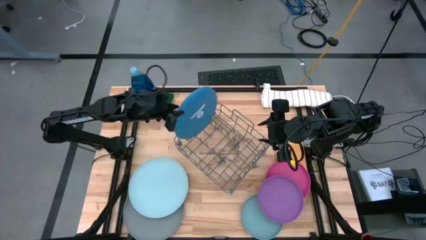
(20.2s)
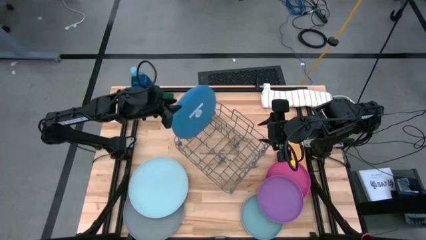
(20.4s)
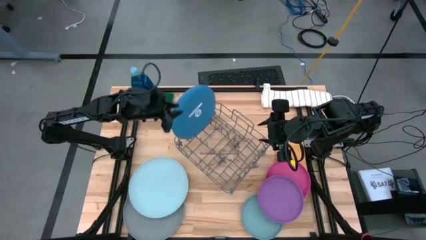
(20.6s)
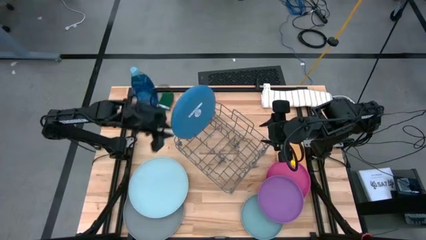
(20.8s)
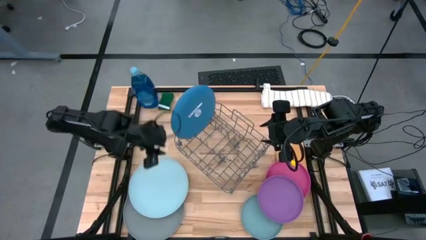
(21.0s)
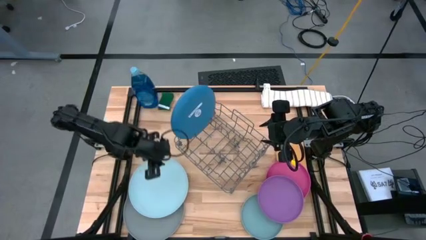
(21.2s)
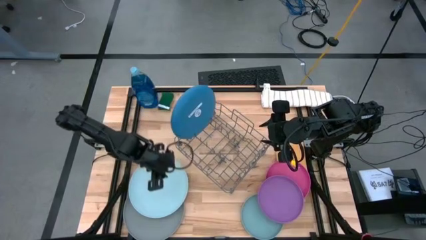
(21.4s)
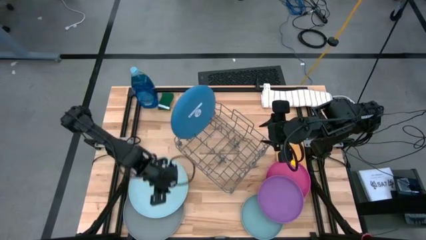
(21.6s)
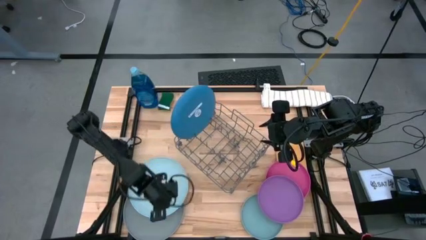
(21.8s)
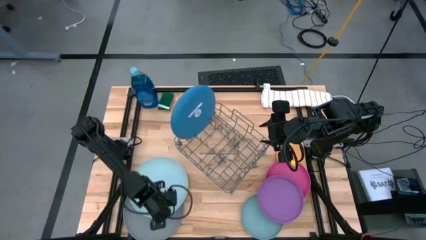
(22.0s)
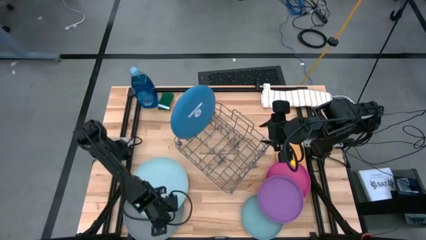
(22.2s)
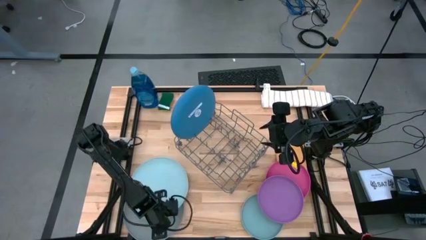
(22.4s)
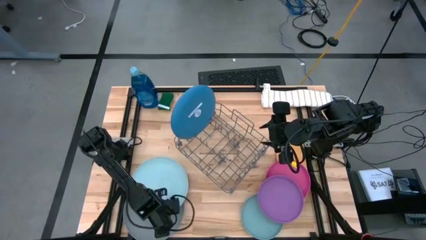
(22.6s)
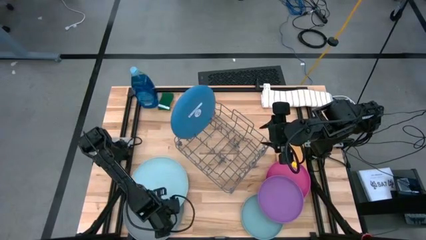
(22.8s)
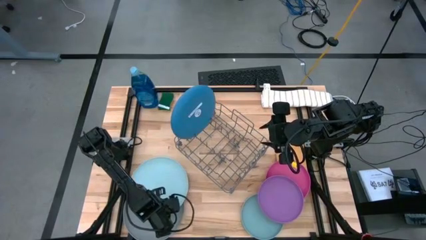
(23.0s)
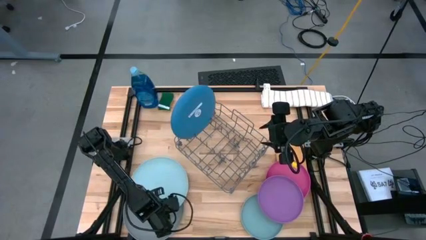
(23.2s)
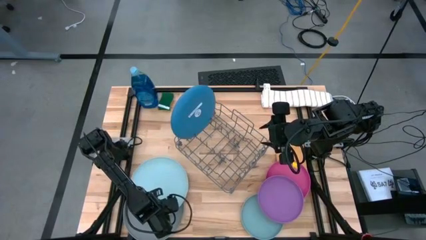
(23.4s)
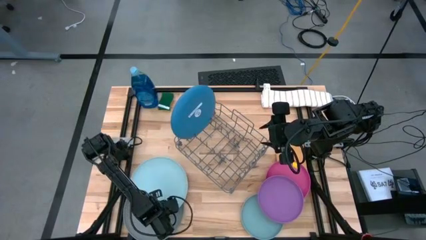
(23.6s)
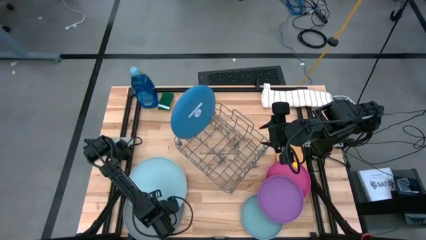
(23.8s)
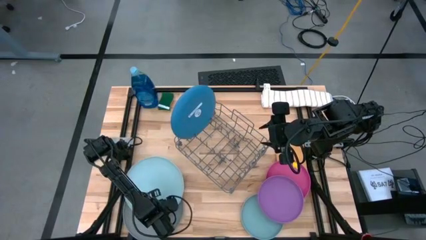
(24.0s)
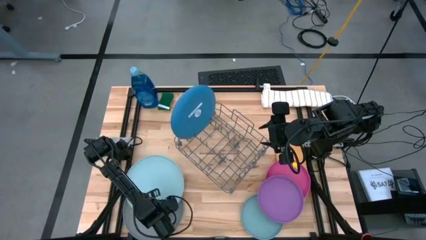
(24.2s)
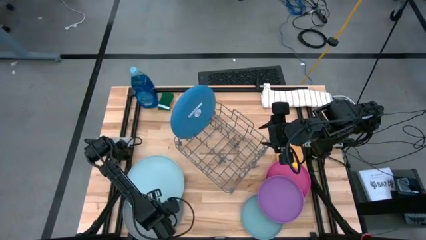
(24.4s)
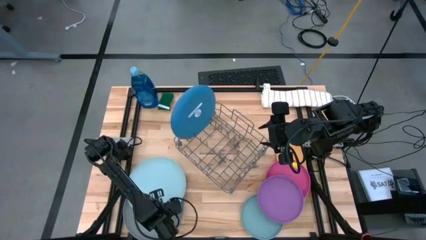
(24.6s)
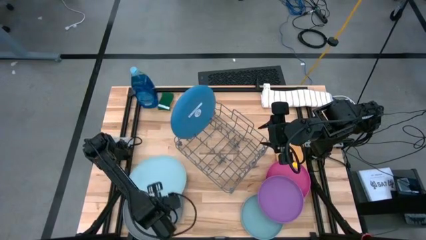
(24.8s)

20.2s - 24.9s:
Task: Sort dishes
Put the big light blue plate into the dish rack

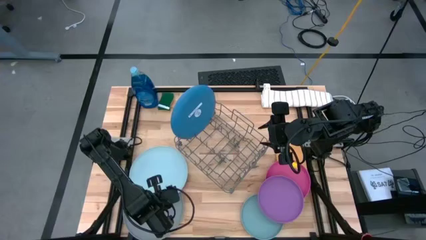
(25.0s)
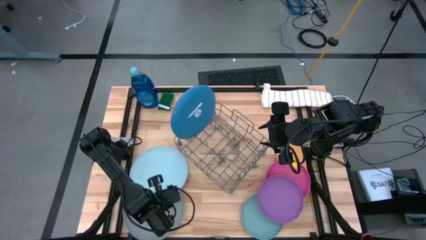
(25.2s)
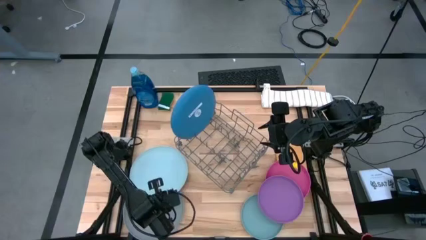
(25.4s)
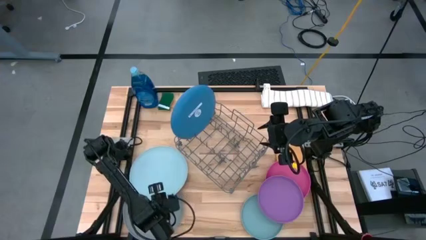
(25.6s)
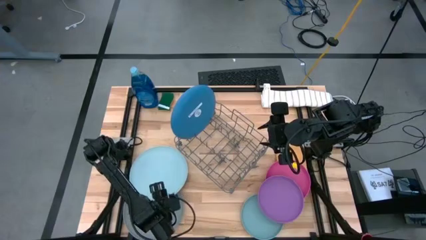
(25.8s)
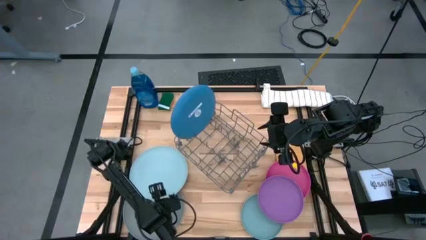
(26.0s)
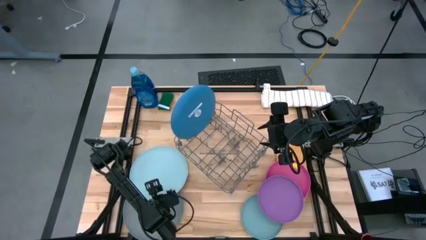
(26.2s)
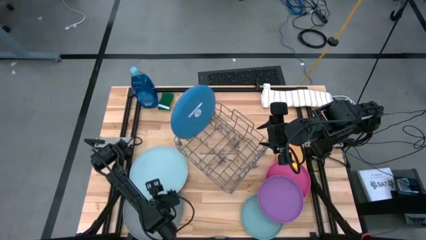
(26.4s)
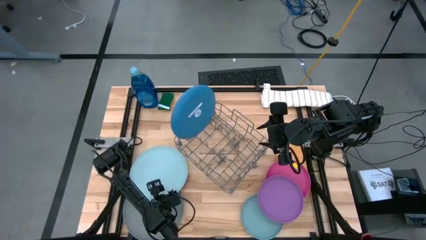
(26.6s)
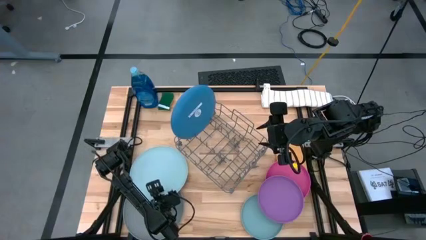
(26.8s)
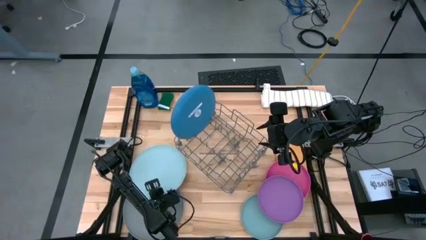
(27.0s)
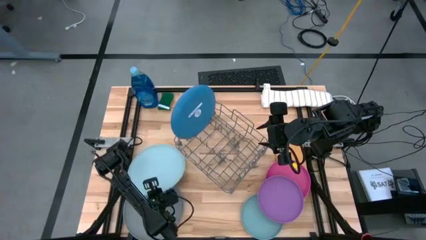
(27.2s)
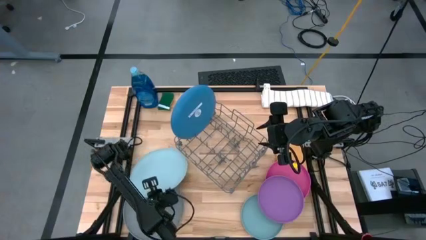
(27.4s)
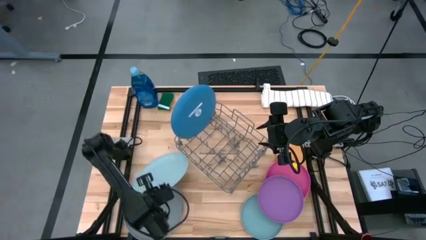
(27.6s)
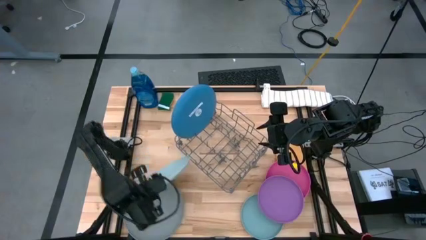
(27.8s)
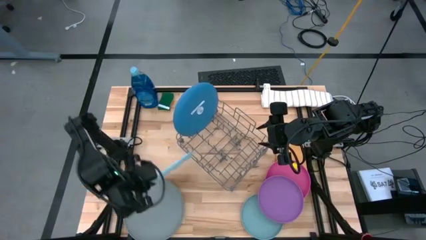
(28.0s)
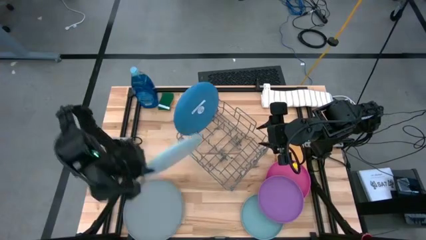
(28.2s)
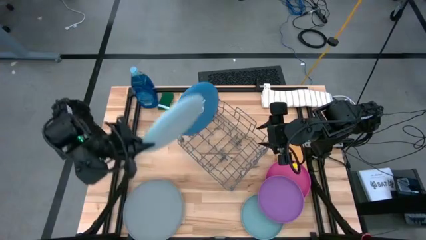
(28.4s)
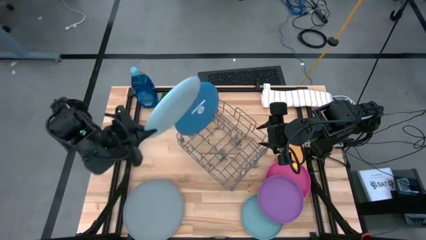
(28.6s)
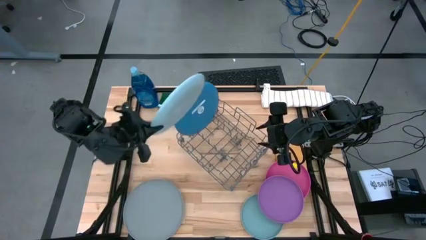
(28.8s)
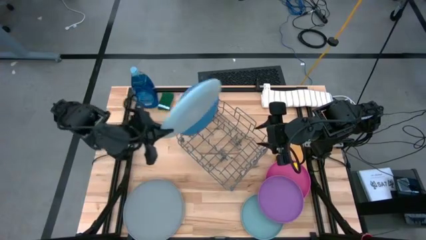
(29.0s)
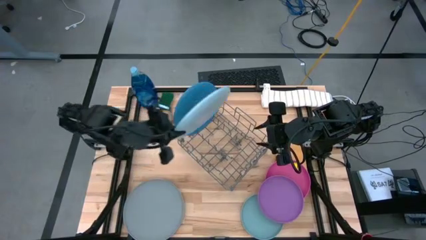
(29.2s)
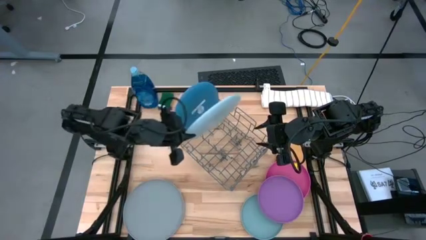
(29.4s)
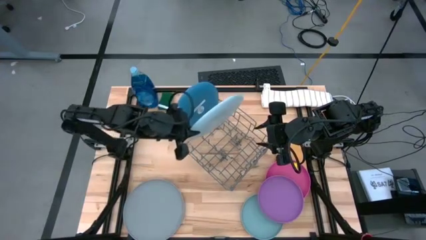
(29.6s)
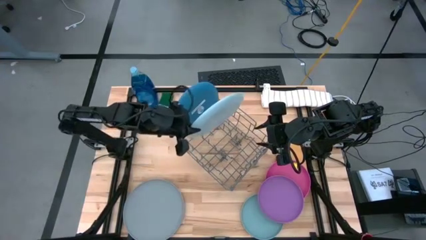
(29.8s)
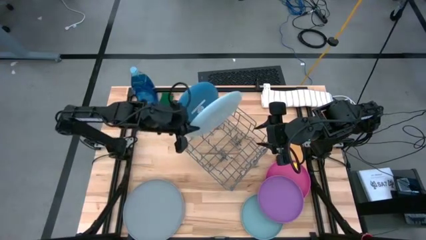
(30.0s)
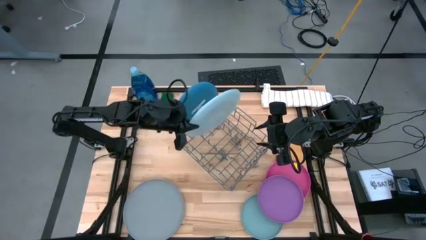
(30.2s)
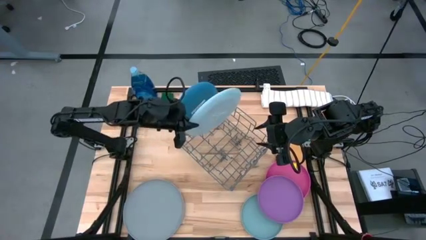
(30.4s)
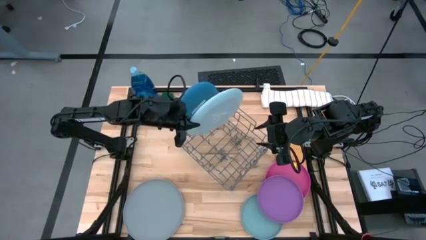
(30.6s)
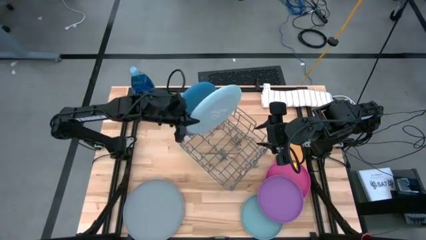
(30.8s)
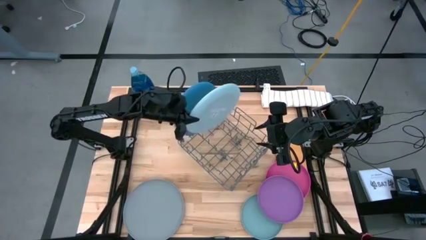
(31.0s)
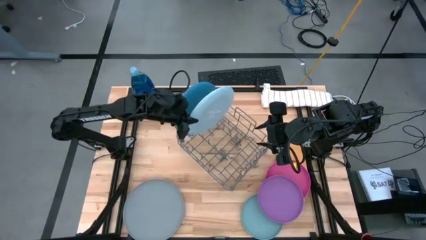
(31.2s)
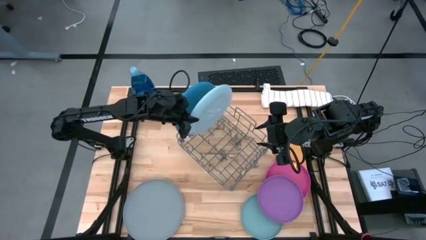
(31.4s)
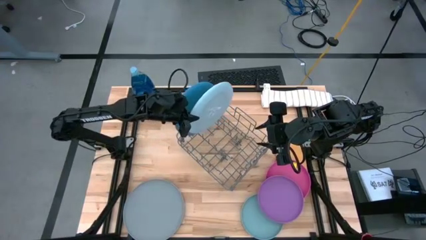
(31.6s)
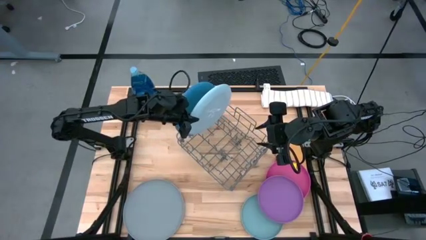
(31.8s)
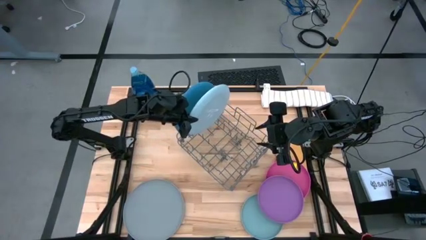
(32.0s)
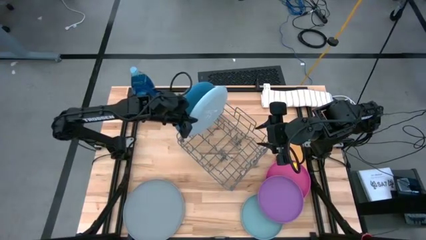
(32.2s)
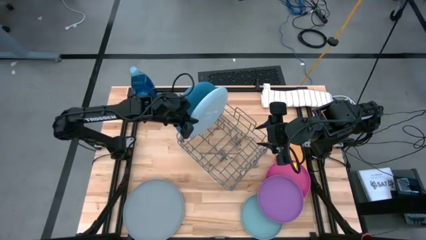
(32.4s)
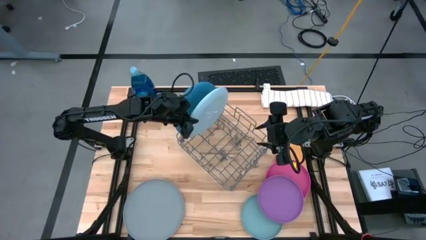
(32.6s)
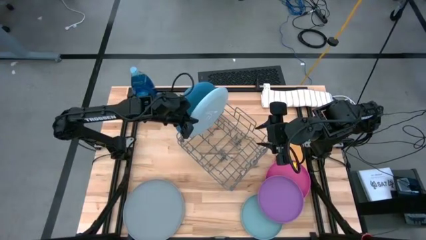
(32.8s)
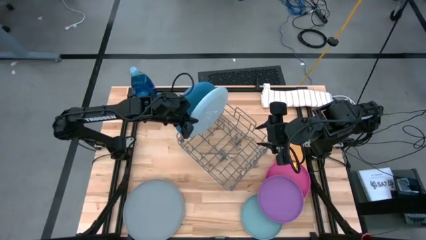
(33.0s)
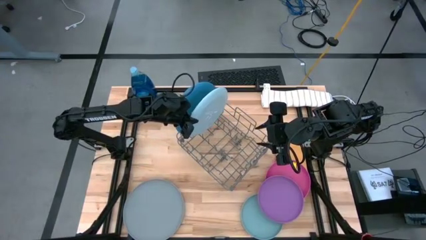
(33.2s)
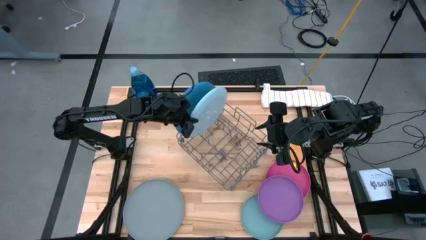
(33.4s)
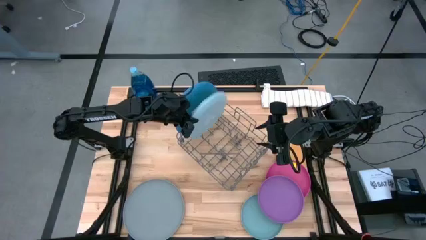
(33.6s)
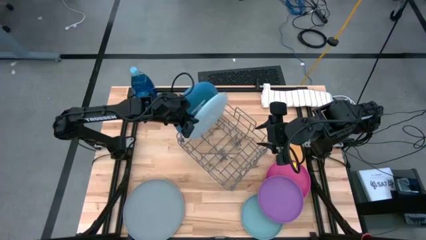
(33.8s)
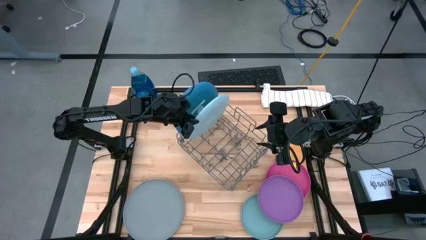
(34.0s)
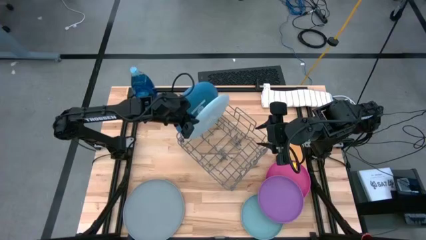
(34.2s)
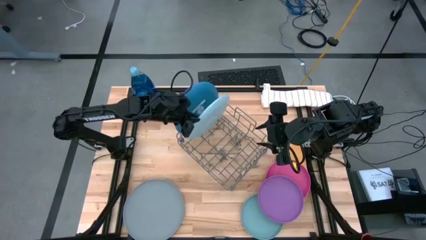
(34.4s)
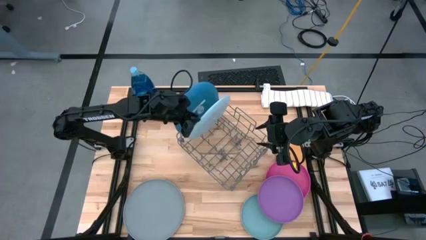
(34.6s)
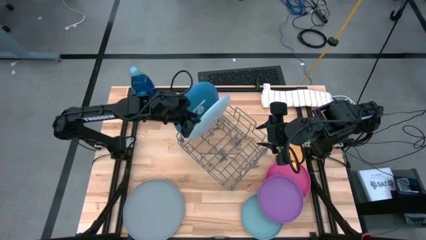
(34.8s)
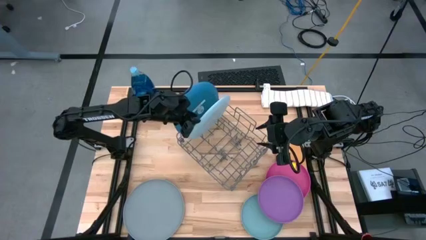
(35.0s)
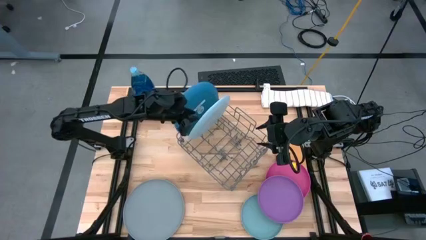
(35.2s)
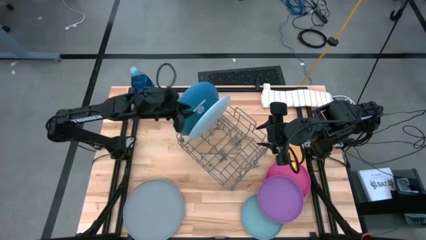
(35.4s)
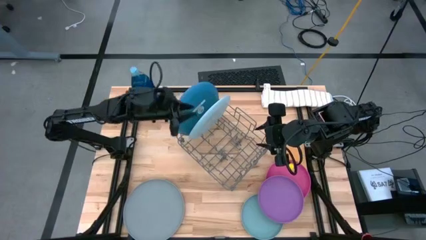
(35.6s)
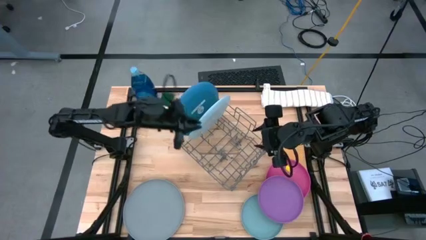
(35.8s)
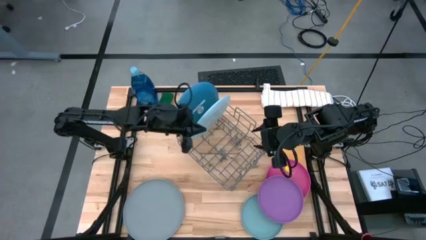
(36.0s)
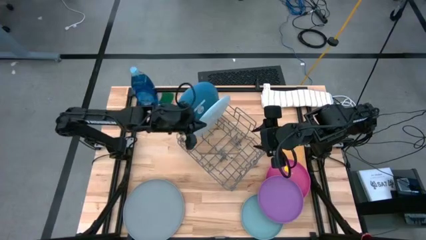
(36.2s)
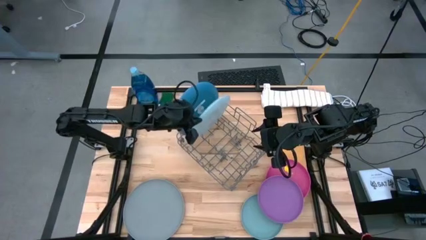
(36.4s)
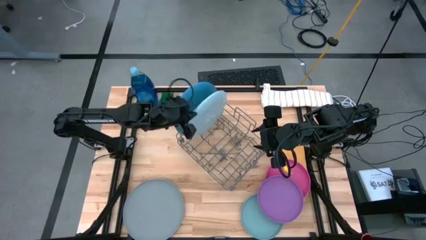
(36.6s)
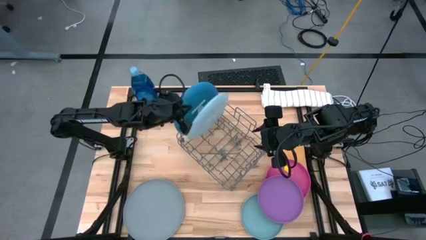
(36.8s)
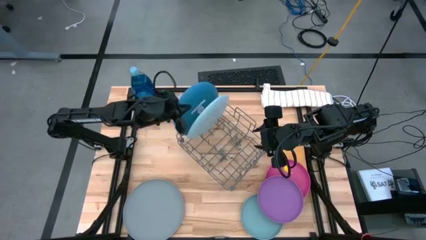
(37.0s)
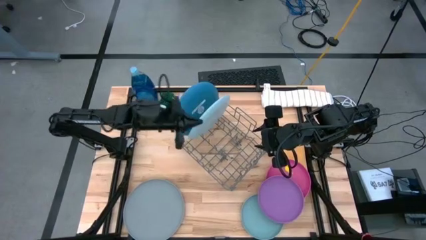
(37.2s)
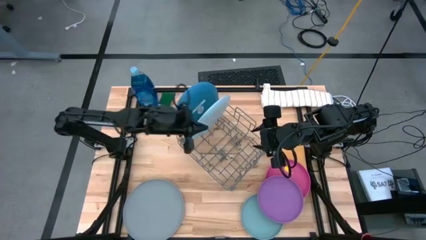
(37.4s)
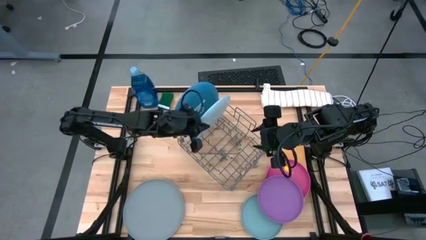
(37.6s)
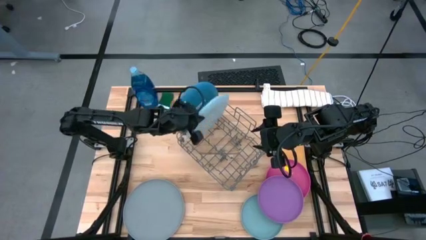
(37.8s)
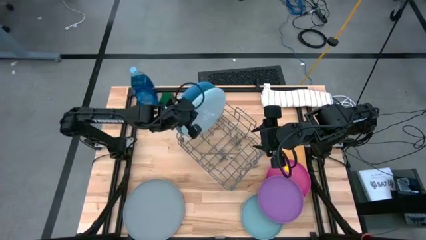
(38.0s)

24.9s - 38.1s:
Put the big light blue plate into the dish rack
